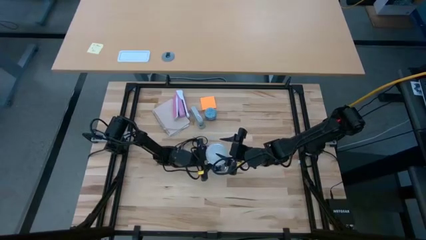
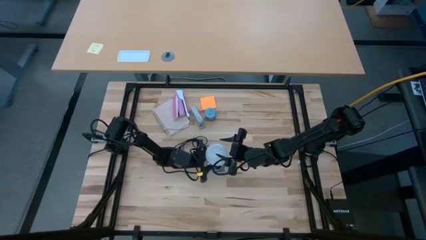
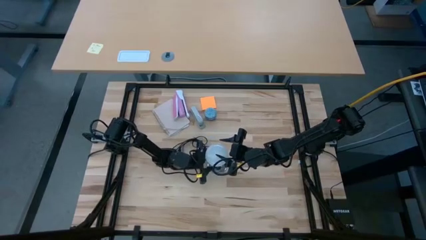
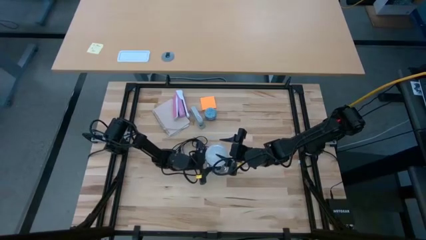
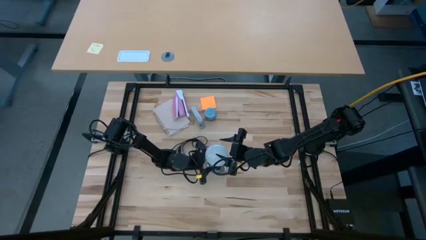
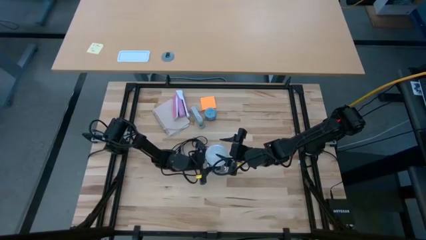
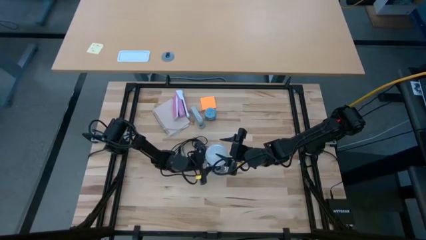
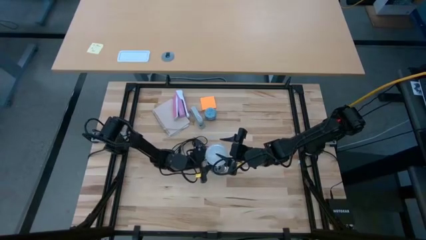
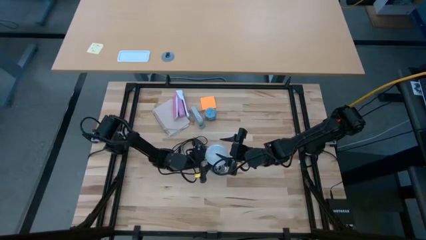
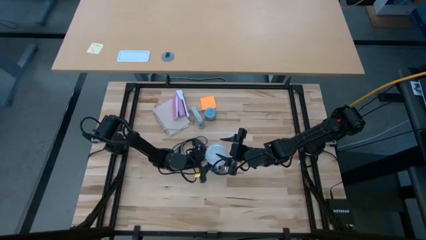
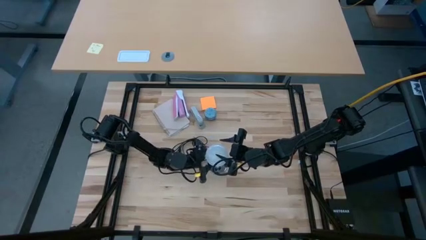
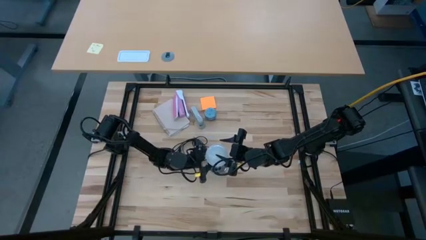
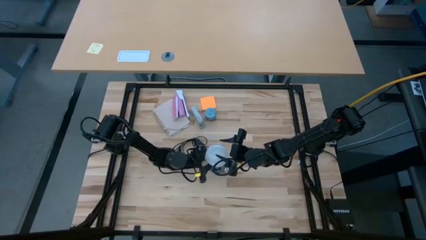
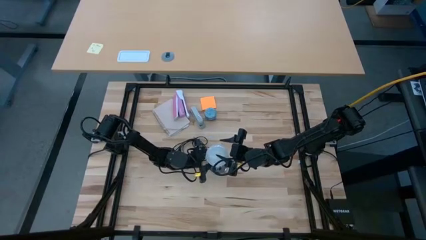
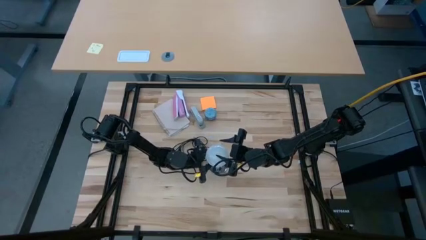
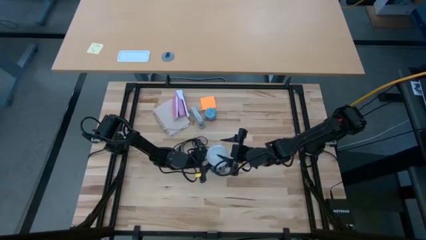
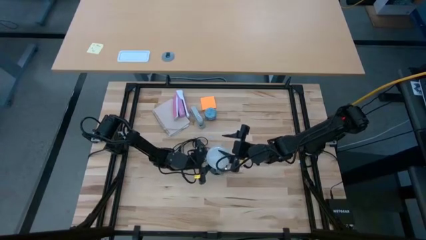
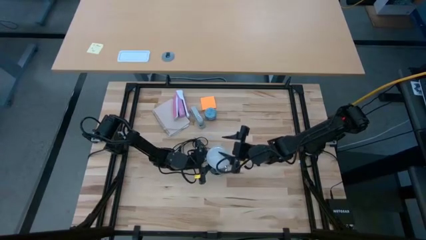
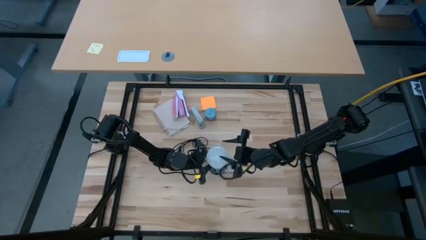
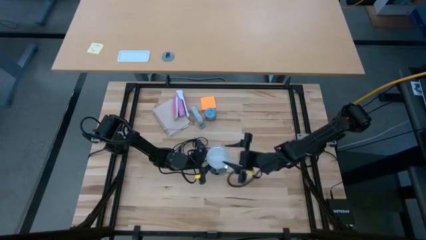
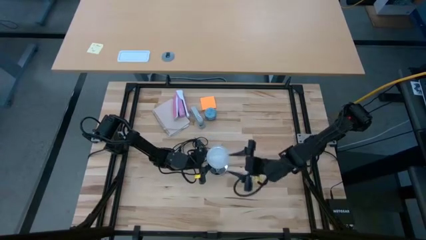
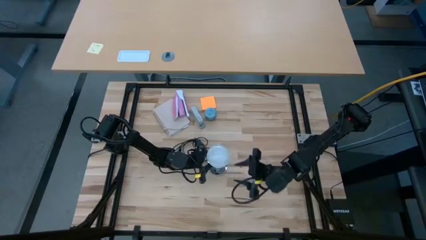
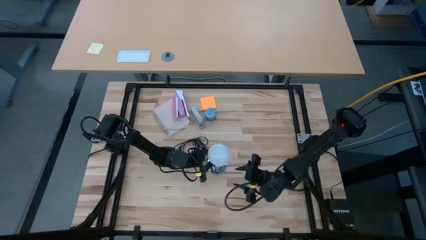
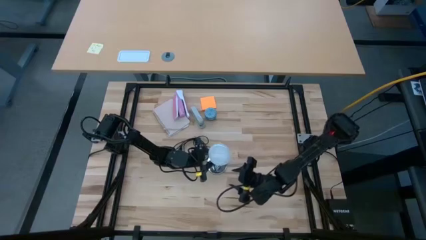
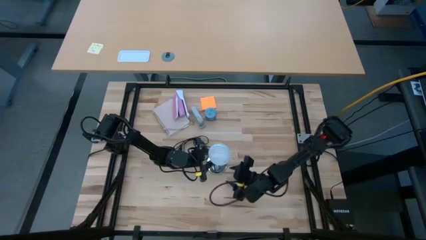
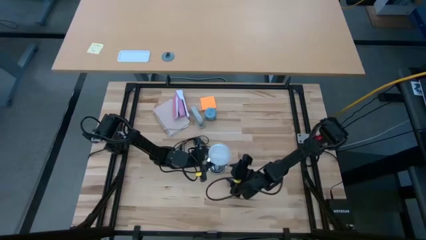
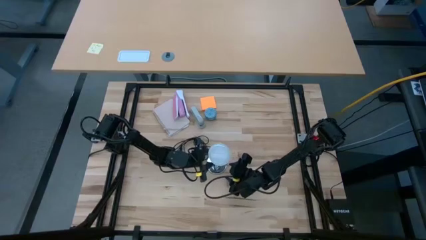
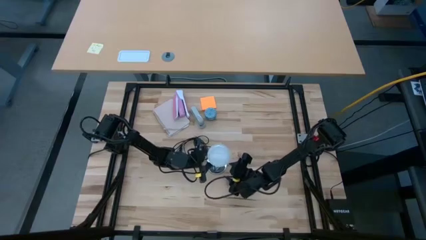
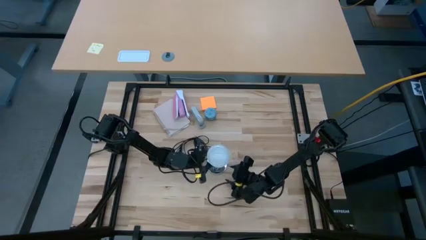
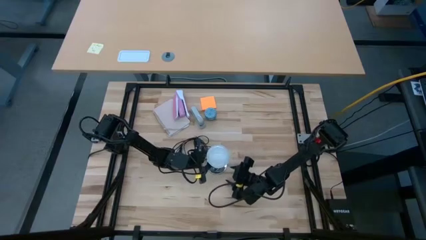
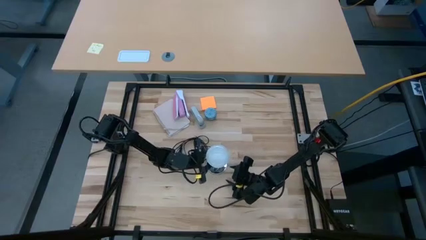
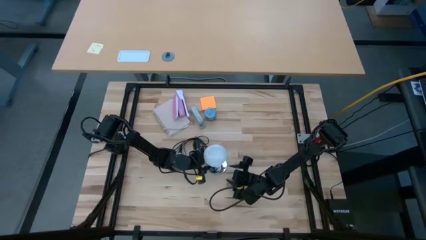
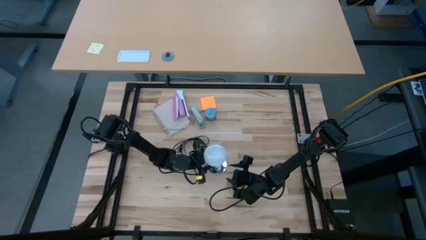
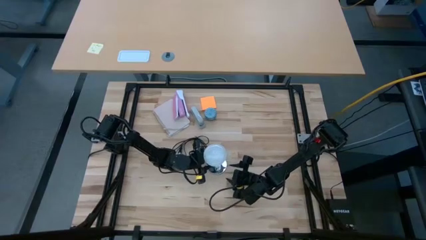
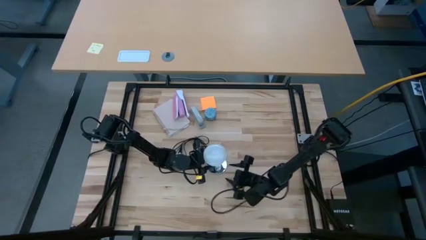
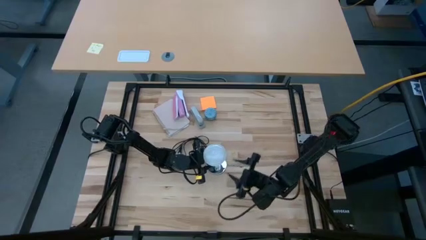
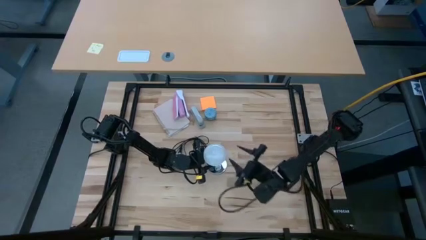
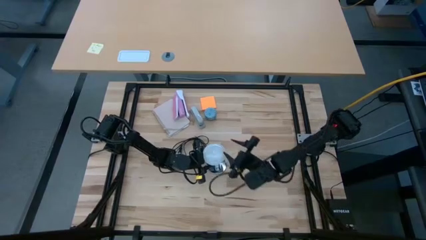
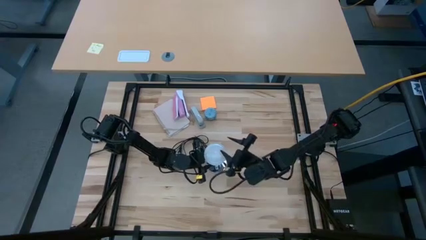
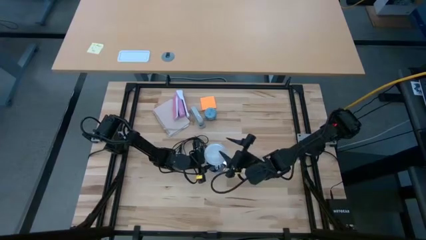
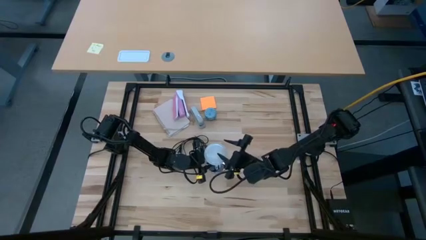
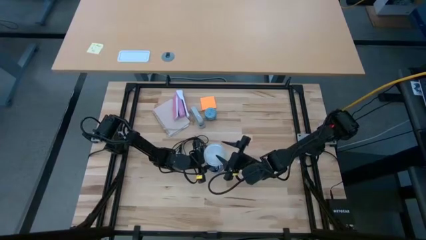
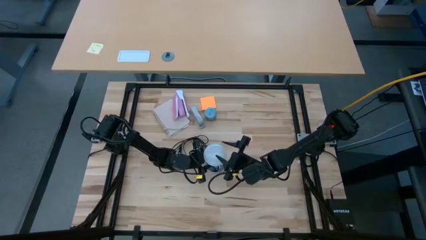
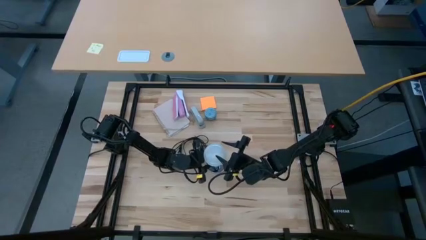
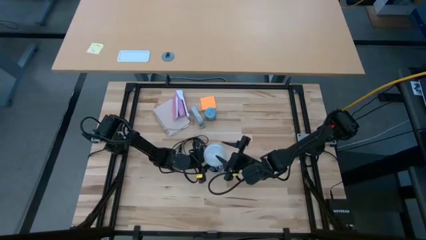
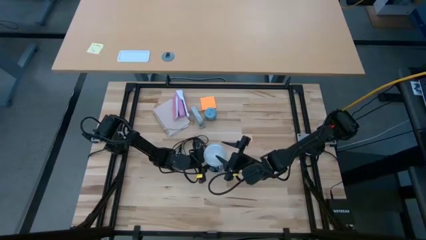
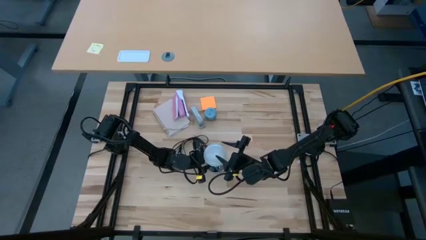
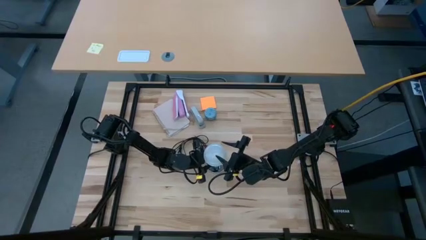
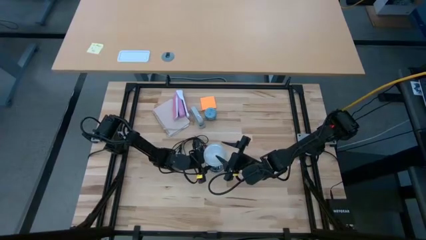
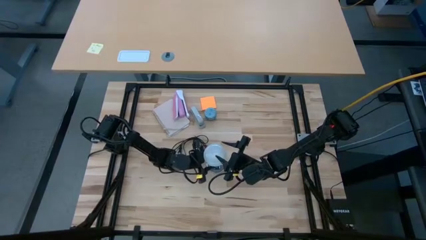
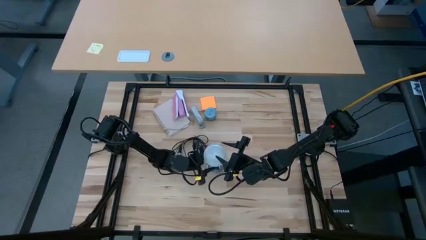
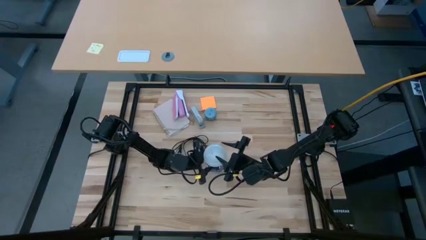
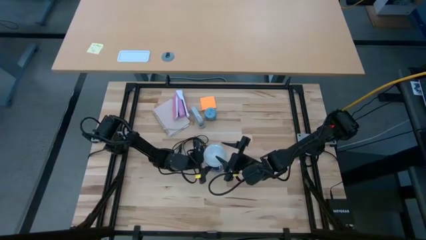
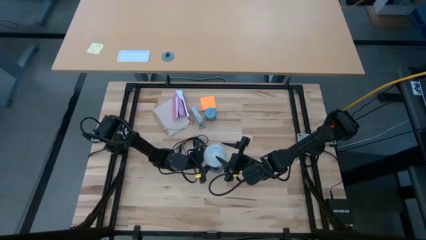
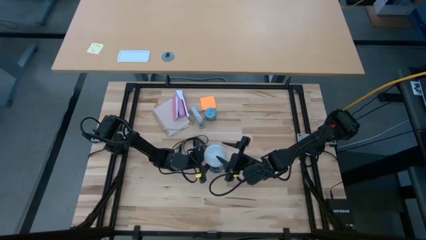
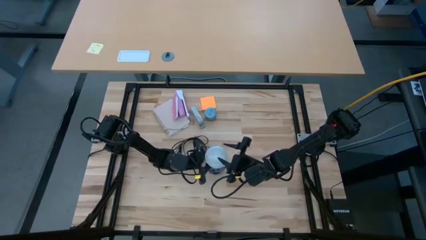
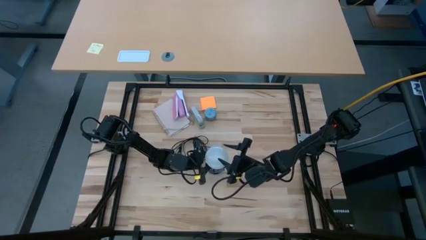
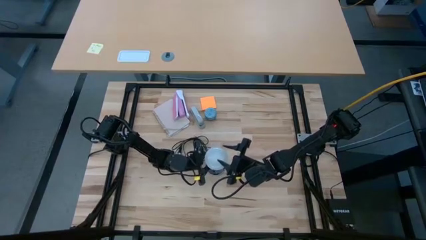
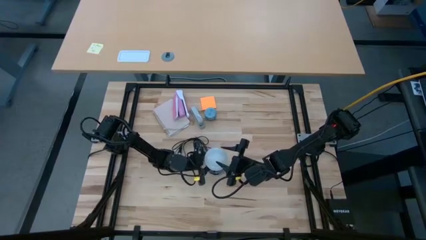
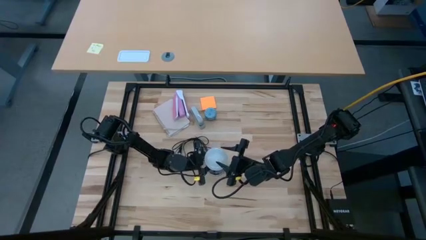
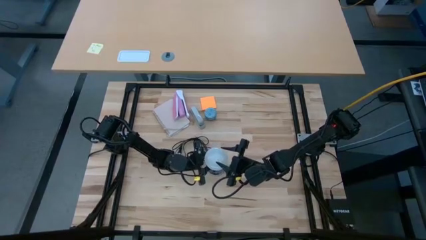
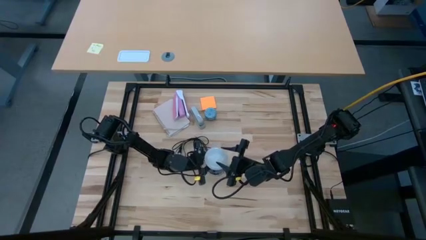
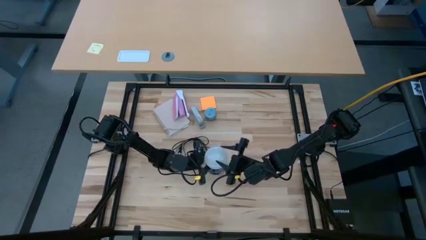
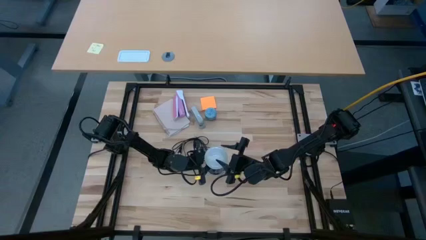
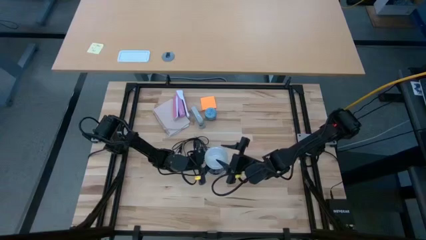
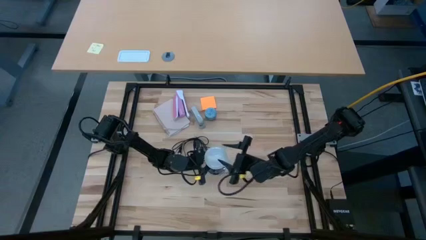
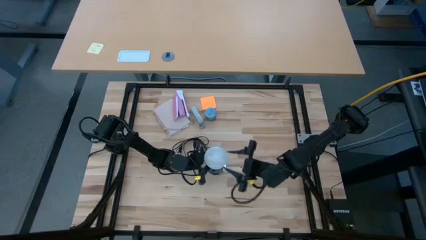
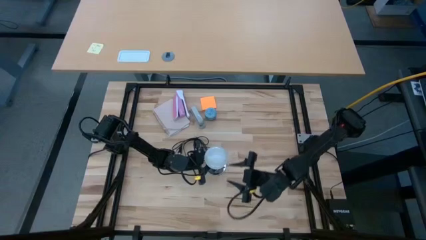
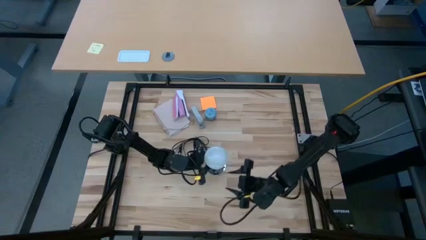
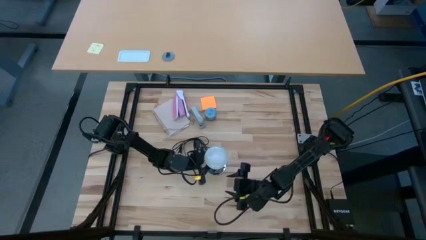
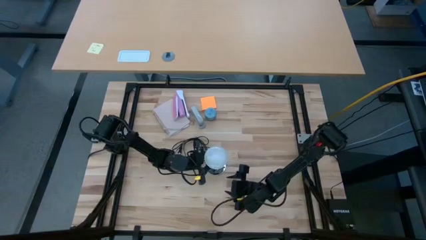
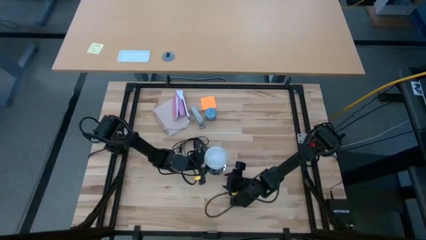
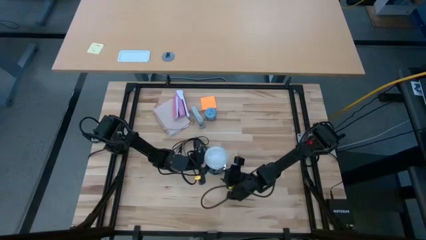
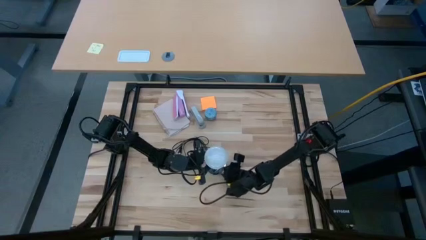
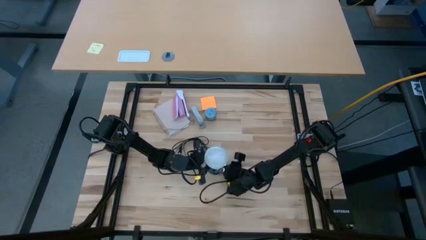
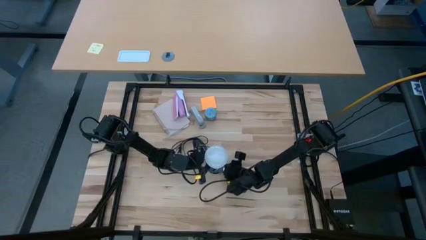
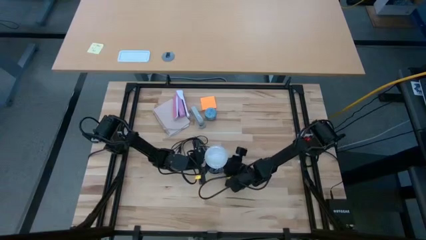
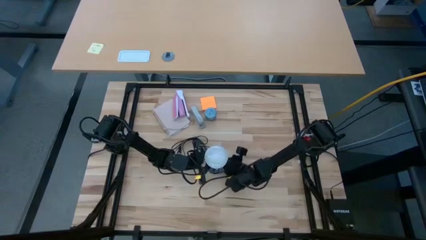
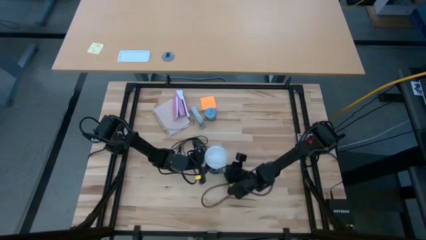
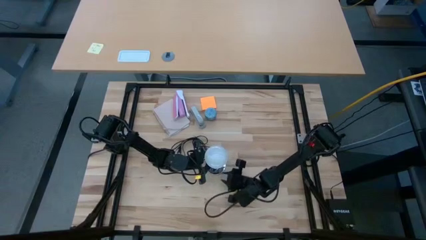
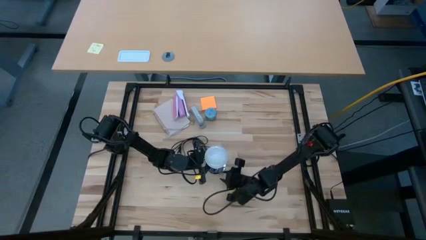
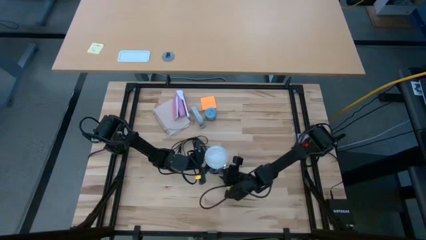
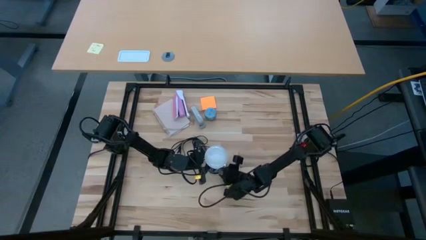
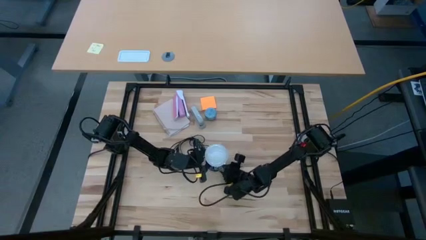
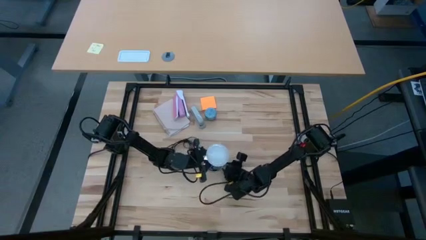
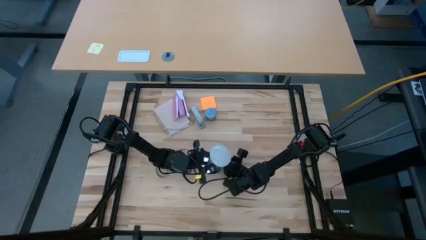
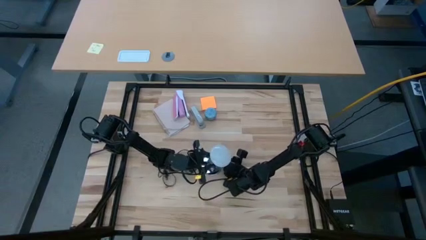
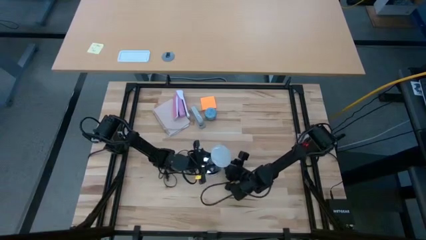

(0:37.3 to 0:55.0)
Task: Screw lightbulb
Insert the white lightbulb into the silver lamp
